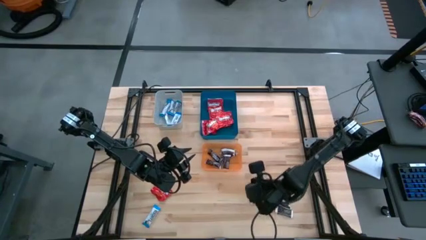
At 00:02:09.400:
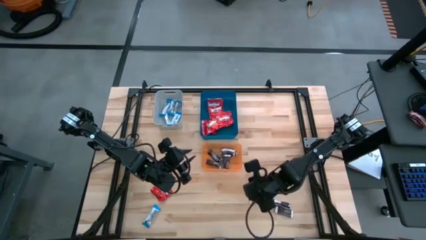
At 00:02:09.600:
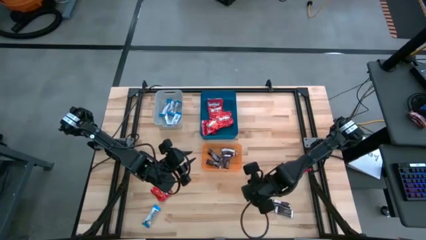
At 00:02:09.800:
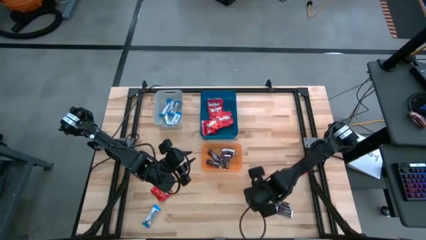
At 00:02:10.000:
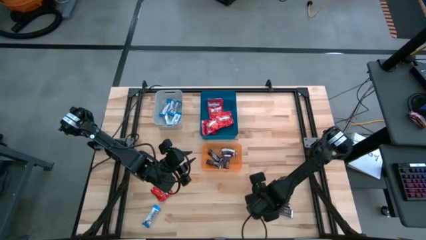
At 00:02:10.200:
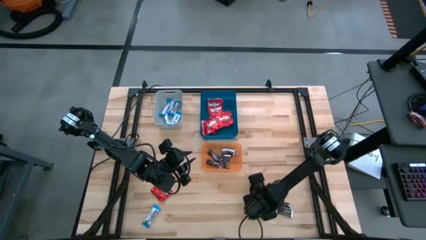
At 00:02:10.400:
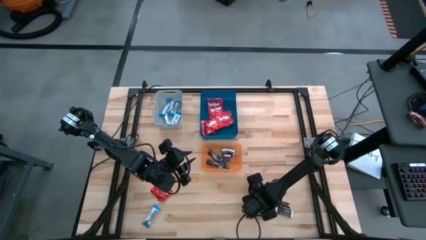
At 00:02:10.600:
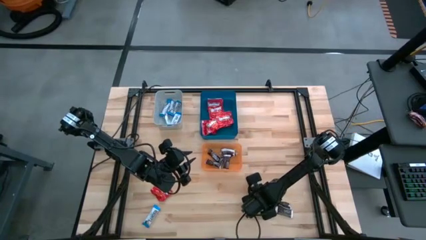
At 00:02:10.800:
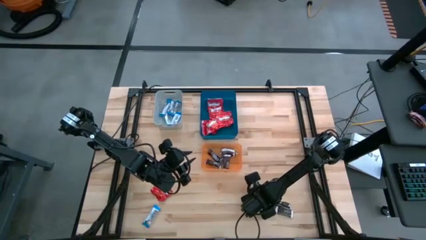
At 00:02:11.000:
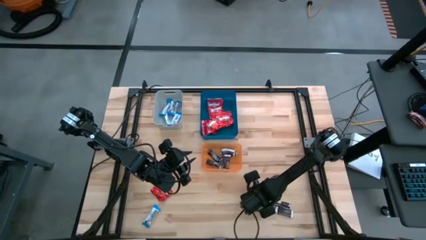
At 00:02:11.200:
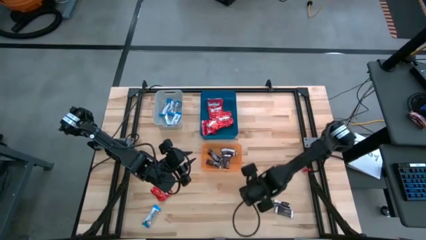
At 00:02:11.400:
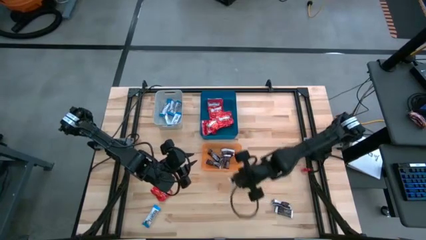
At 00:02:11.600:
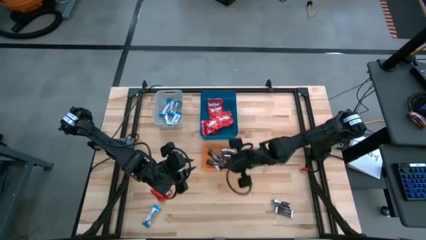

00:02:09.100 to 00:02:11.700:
Task: Sort candy
Put the brown chocolate bar into the orange bin

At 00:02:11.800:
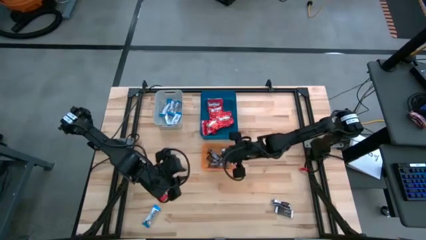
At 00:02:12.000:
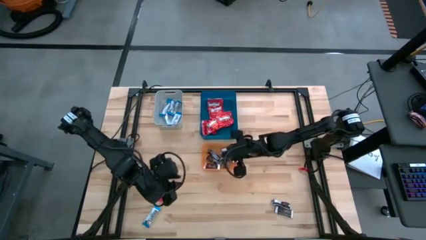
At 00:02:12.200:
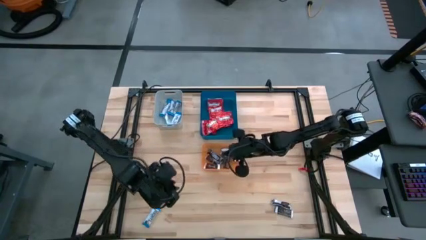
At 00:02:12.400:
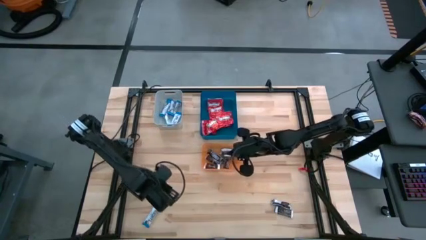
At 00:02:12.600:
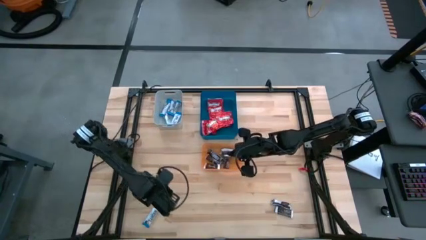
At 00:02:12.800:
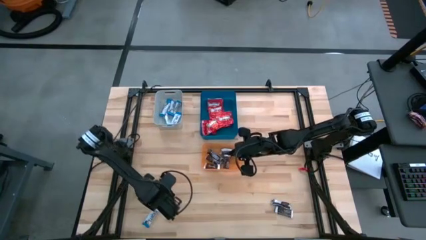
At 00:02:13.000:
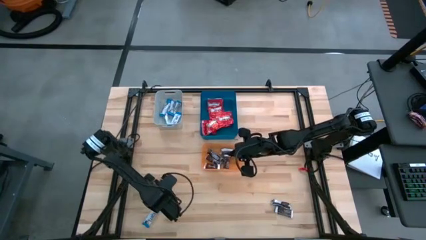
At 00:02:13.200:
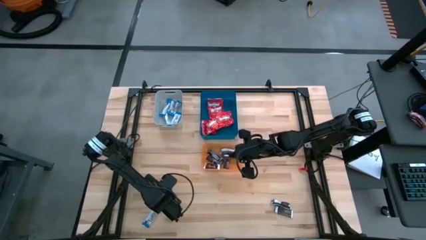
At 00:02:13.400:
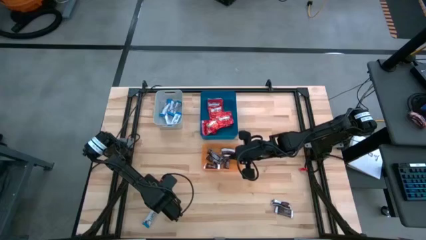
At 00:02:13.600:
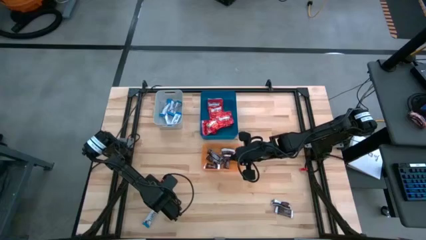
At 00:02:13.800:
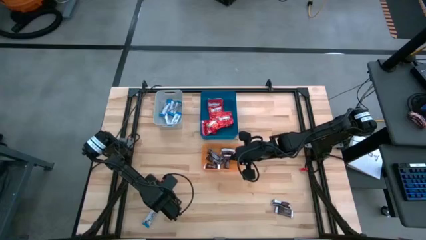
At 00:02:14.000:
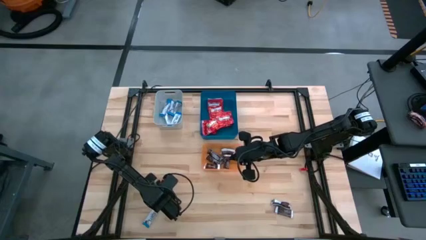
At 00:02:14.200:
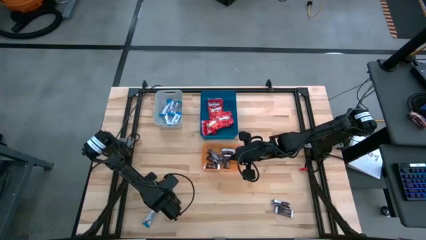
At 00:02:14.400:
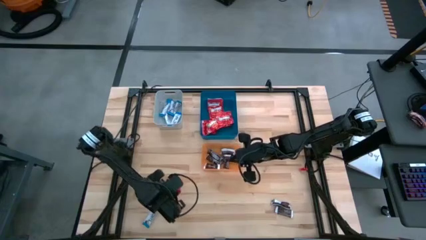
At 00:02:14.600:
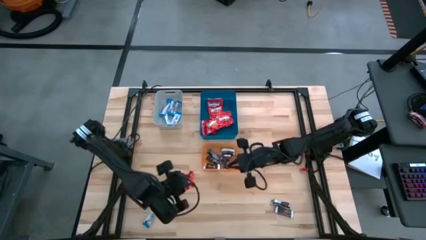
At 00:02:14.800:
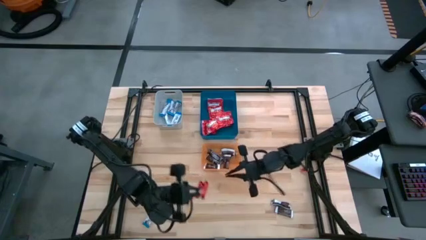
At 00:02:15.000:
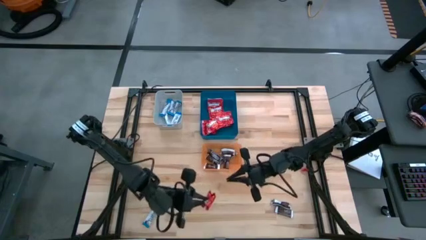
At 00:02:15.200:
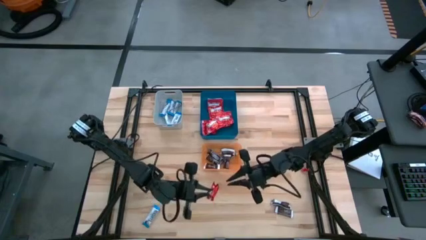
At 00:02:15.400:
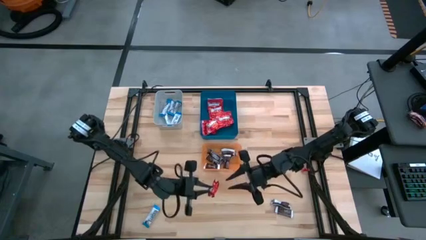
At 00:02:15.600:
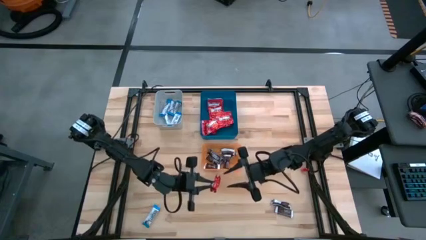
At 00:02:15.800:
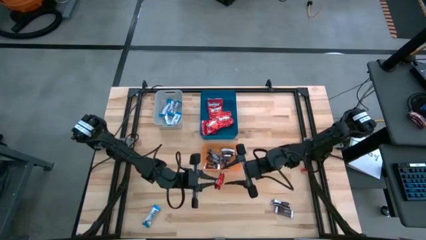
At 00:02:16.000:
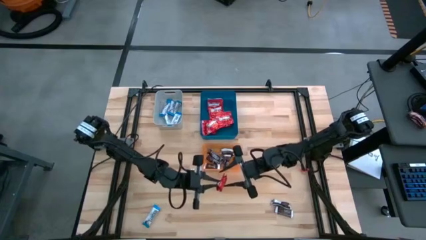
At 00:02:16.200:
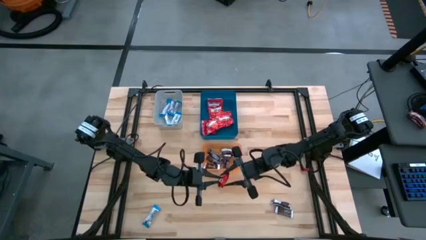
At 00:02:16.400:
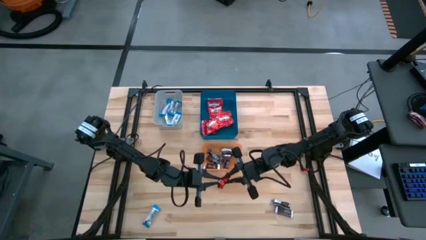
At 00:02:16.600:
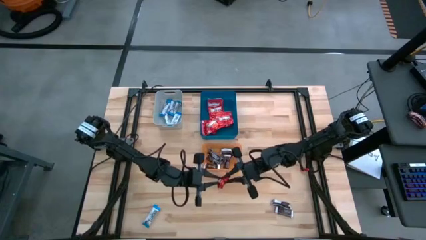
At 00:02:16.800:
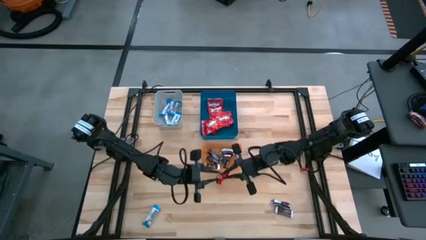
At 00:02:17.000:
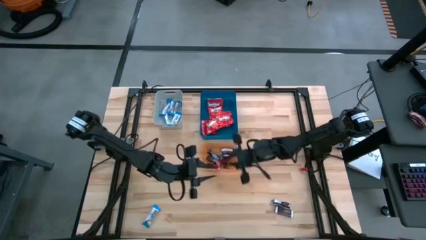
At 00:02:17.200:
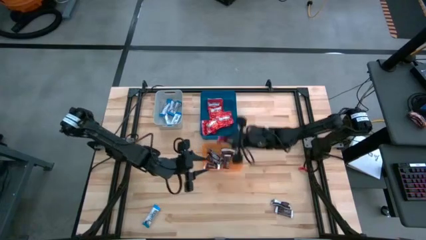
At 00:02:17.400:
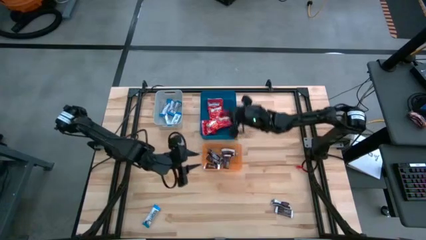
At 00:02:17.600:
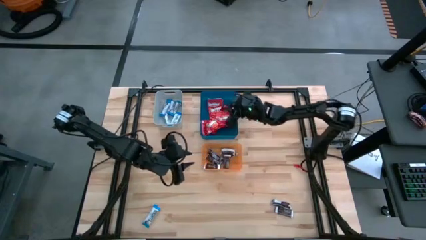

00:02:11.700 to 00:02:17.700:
Put the red candy into the blue bin

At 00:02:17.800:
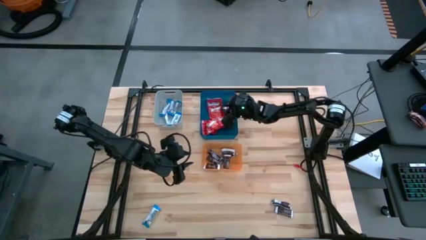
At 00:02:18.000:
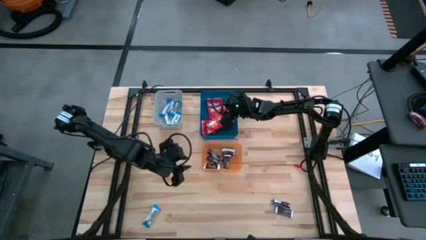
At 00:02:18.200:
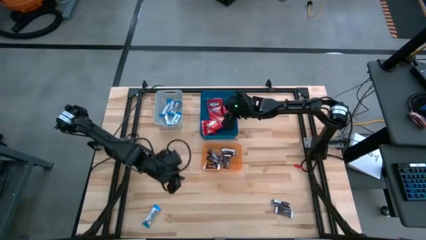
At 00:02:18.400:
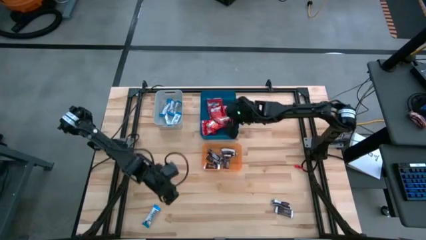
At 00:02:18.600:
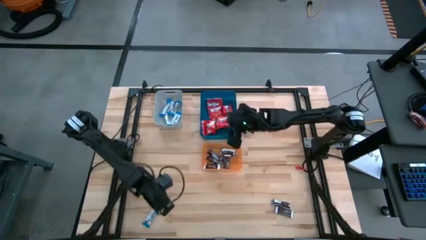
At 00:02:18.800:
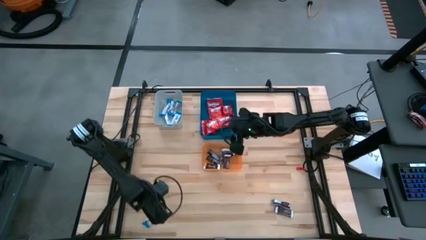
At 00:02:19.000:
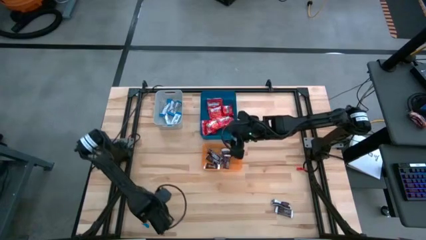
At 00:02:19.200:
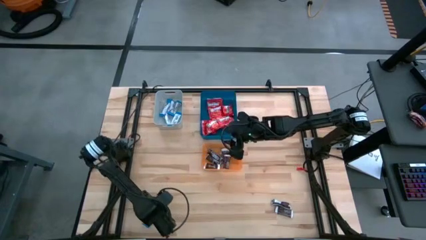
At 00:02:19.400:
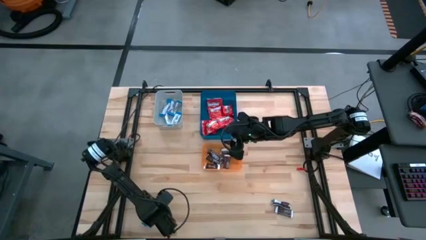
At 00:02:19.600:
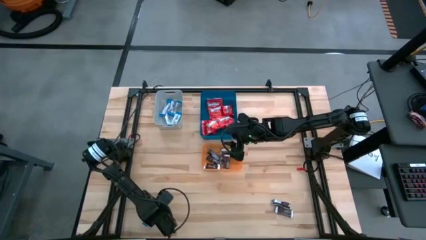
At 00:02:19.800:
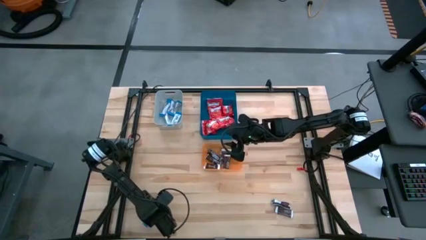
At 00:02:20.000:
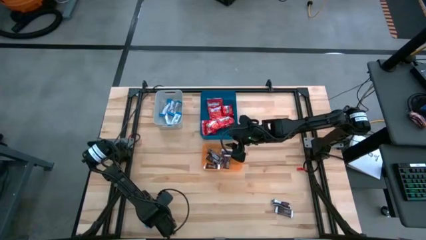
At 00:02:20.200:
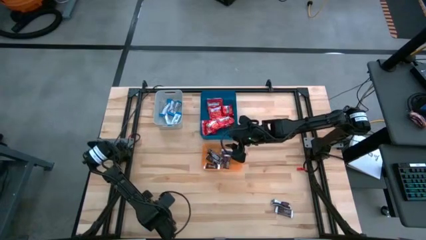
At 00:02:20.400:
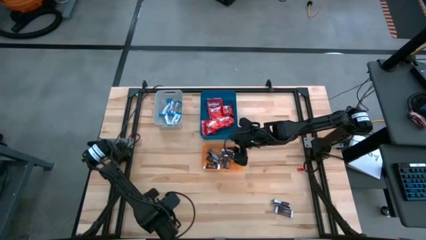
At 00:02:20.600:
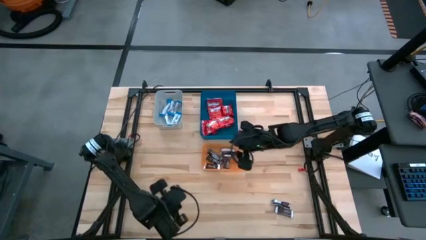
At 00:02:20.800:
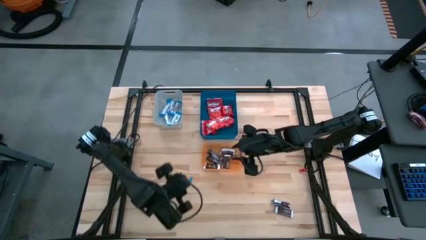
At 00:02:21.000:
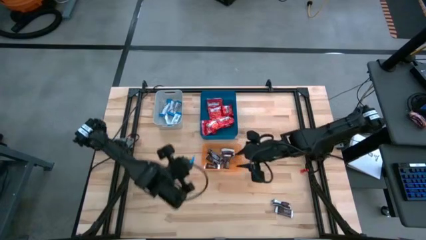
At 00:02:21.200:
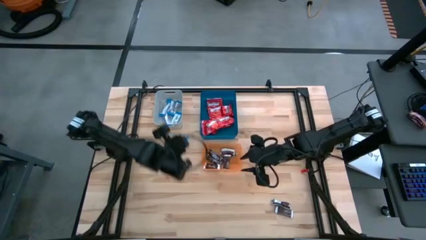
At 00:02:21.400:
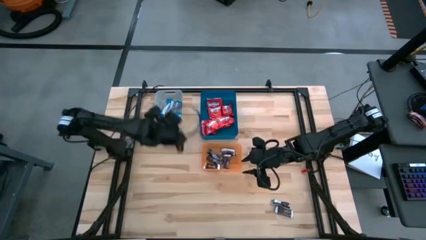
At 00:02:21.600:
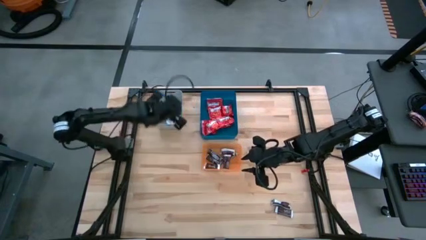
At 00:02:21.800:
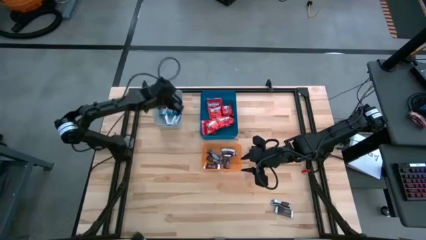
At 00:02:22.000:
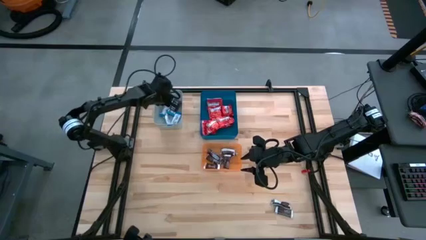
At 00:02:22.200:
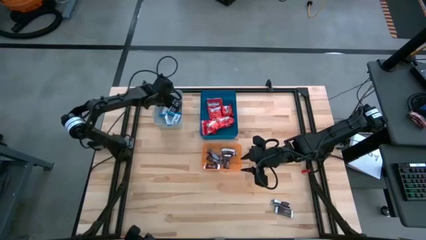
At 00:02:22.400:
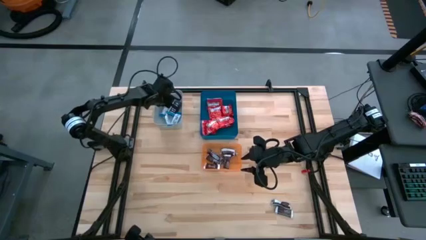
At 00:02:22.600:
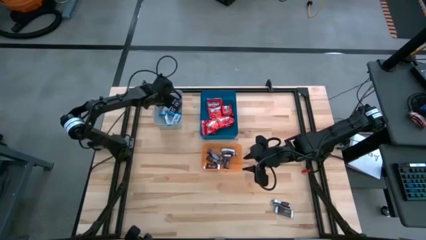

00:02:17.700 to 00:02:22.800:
Put the blue chocolate bar into the gray bin

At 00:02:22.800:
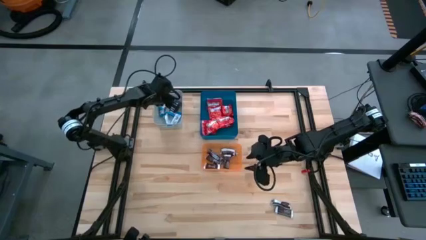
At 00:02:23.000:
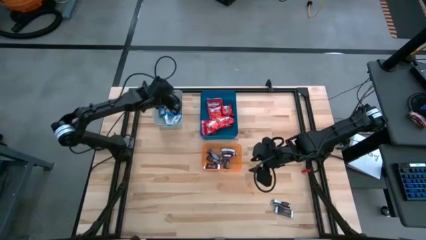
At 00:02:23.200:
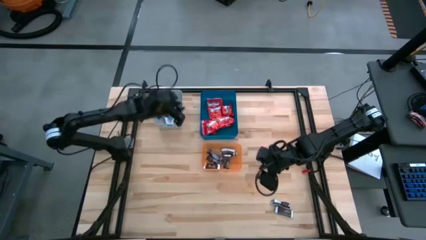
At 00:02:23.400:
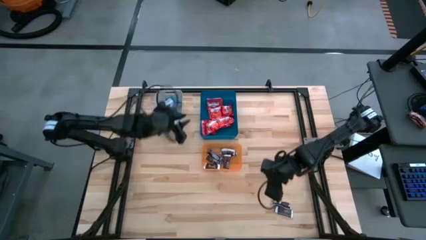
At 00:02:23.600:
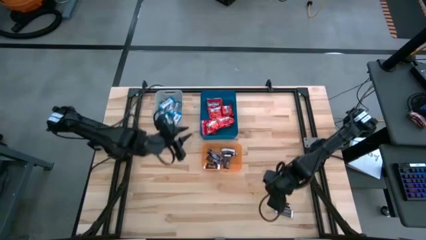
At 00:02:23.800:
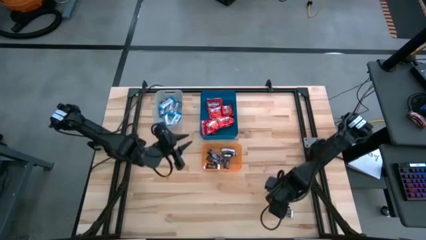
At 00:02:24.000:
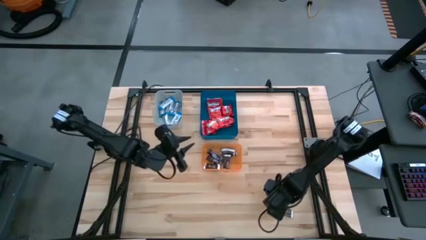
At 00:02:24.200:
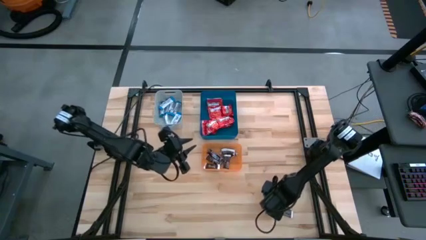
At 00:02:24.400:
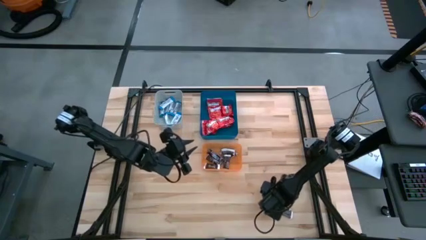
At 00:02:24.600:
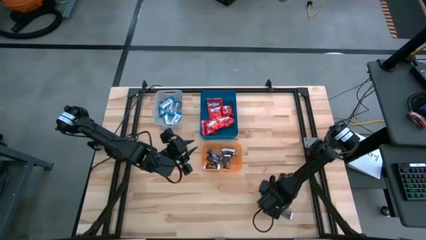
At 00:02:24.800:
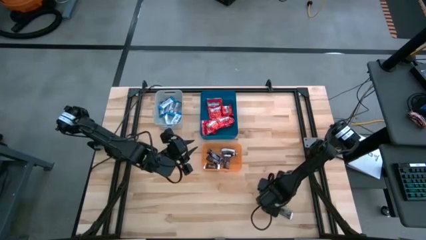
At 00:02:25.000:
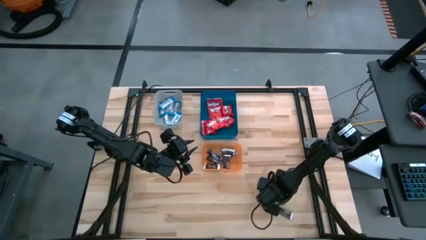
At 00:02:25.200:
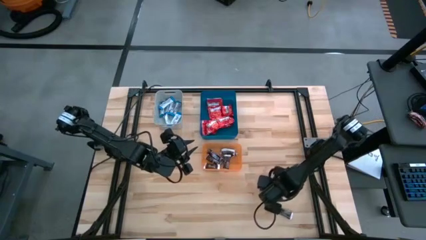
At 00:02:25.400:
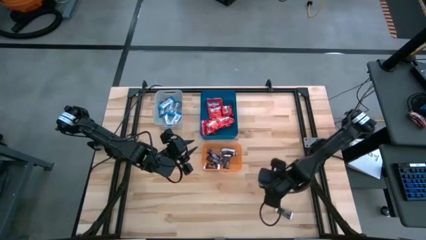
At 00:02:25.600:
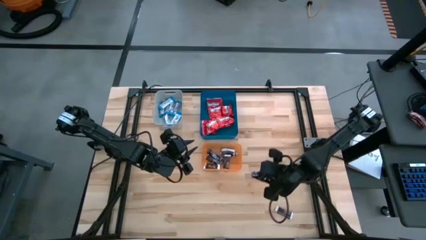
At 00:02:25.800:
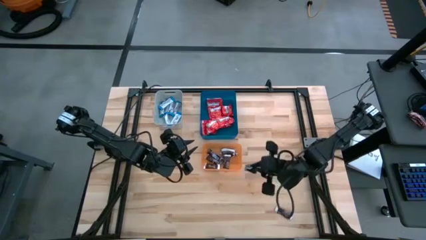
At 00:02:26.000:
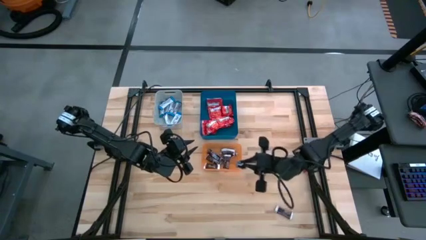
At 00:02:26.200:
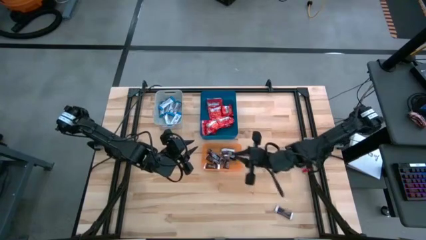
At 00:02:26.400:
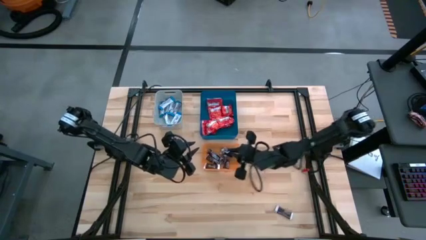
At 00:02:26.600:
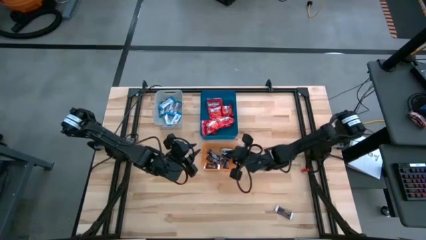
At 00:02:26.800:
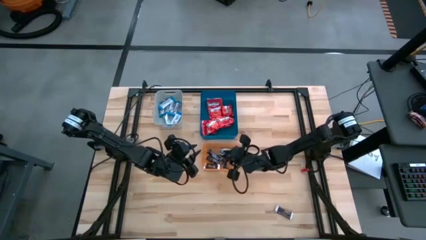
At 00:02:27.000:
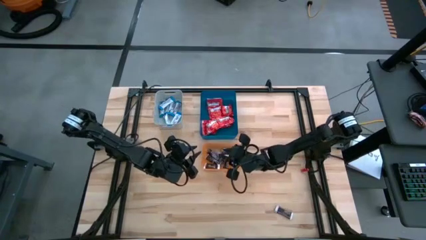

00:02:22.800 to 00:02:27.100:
Put the brown chocolate bar into the orange bin
